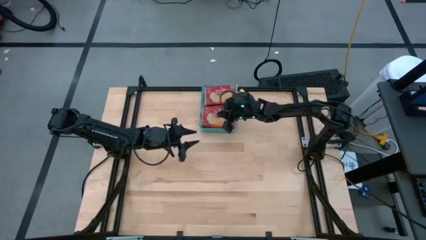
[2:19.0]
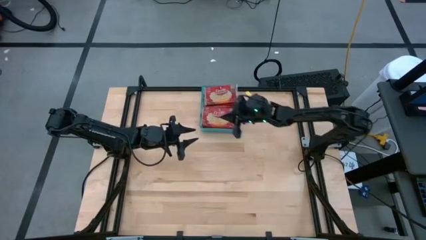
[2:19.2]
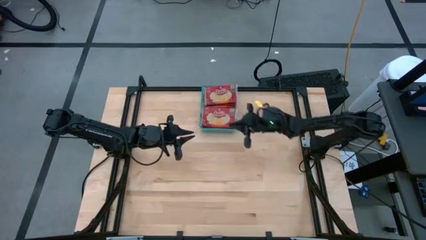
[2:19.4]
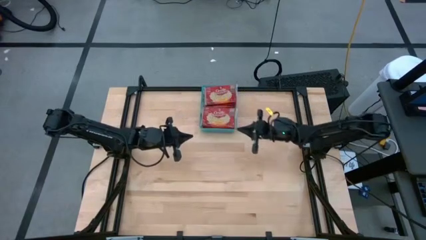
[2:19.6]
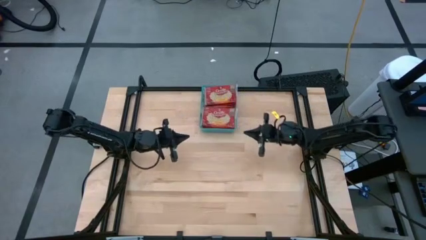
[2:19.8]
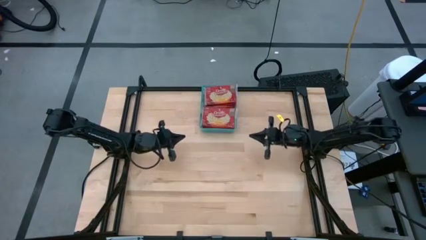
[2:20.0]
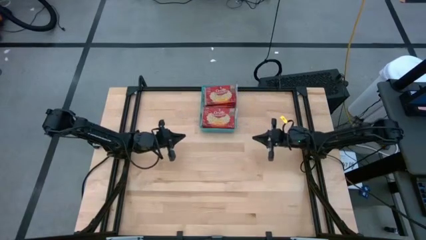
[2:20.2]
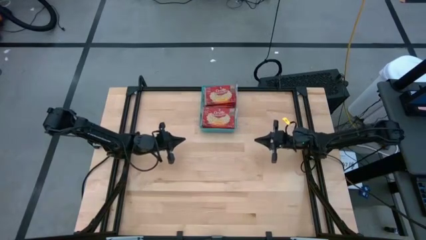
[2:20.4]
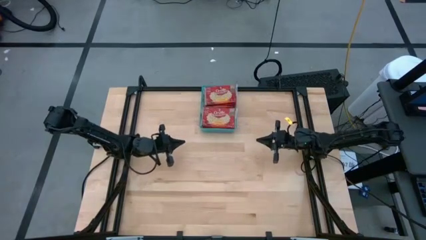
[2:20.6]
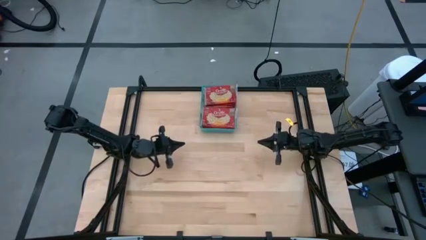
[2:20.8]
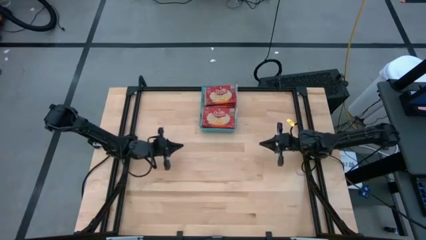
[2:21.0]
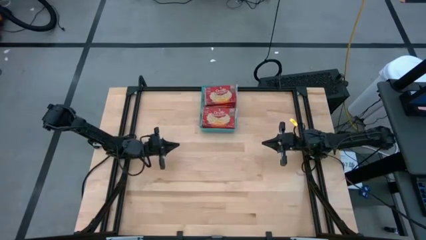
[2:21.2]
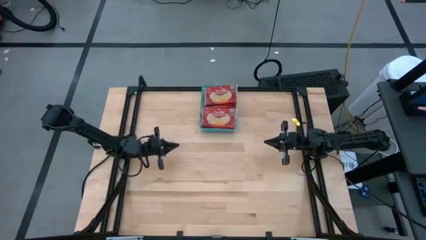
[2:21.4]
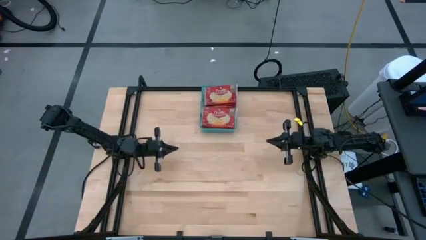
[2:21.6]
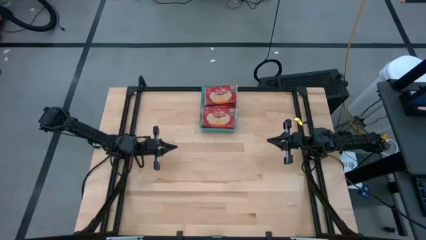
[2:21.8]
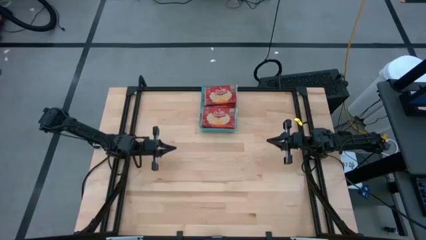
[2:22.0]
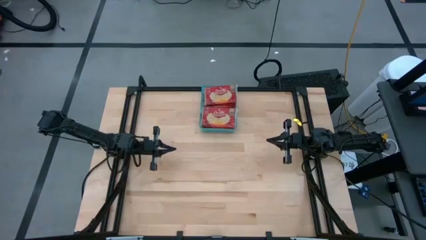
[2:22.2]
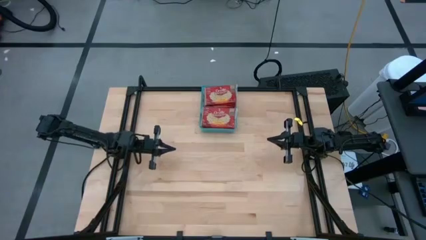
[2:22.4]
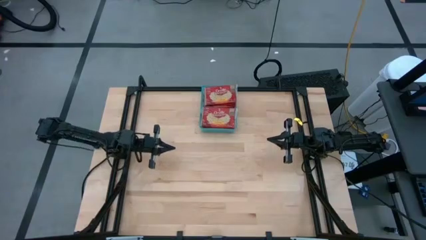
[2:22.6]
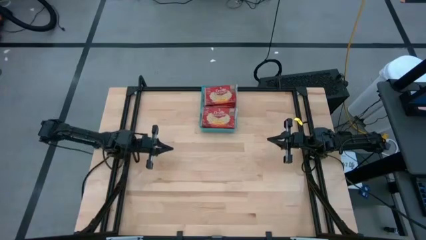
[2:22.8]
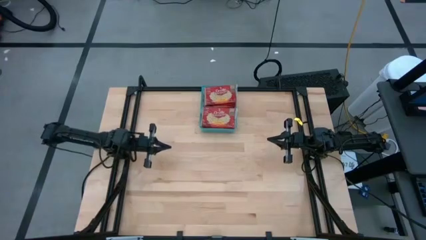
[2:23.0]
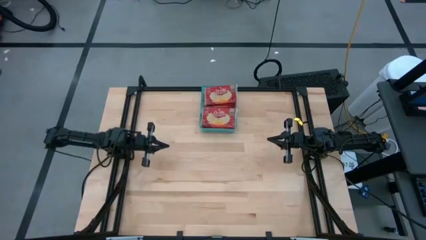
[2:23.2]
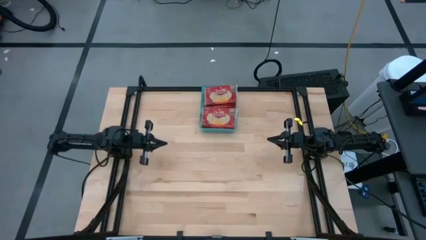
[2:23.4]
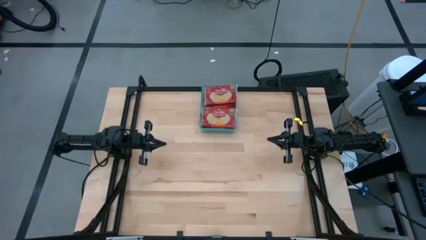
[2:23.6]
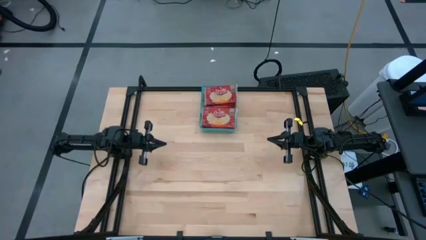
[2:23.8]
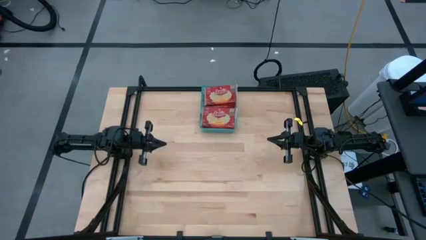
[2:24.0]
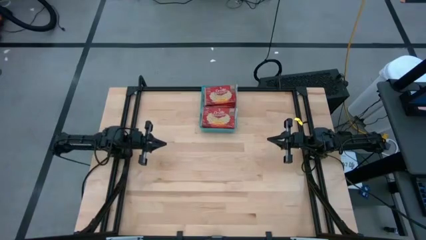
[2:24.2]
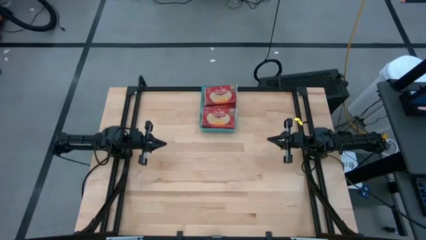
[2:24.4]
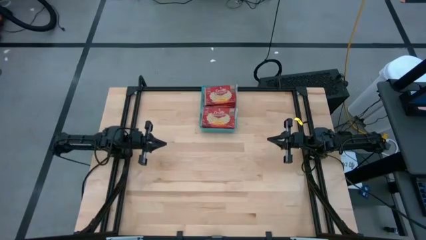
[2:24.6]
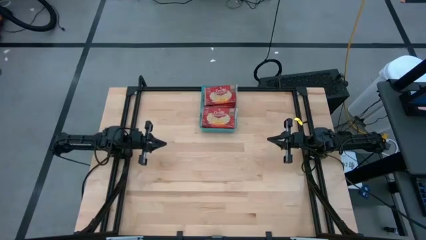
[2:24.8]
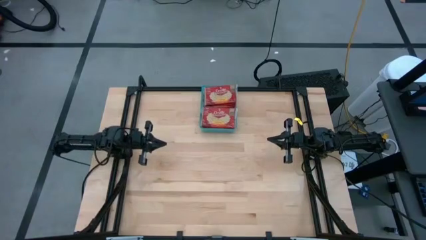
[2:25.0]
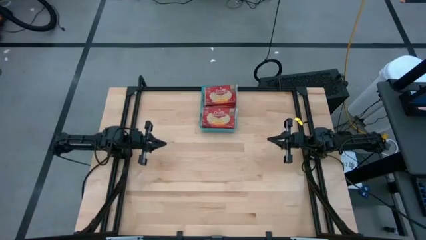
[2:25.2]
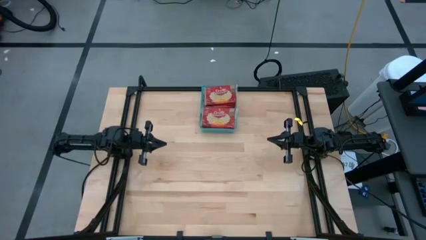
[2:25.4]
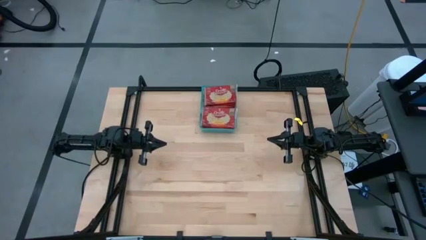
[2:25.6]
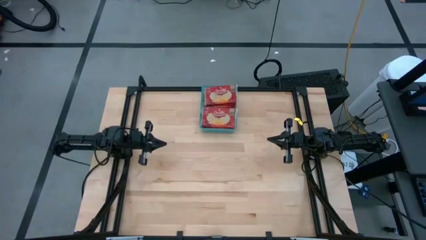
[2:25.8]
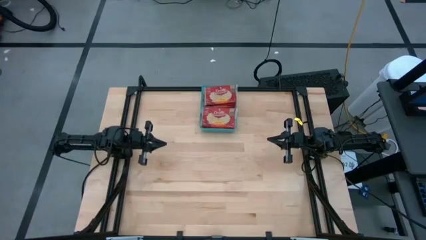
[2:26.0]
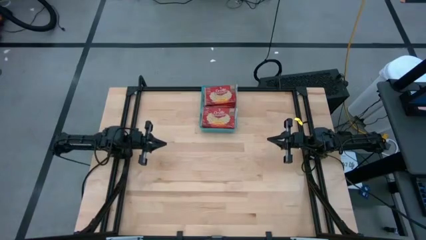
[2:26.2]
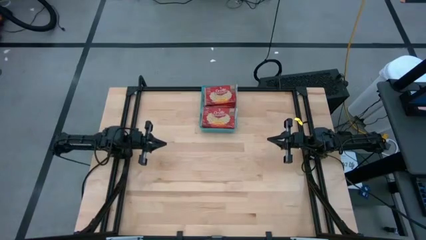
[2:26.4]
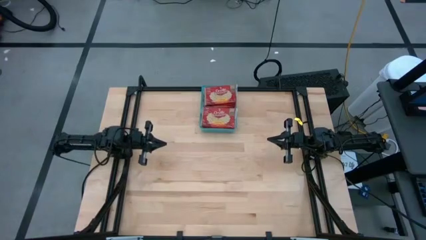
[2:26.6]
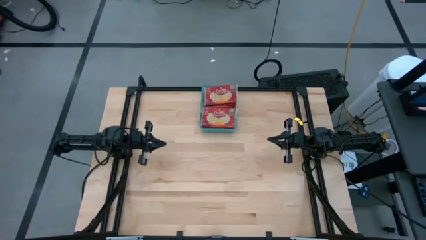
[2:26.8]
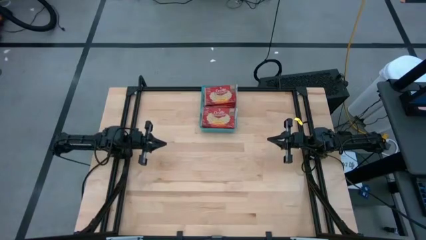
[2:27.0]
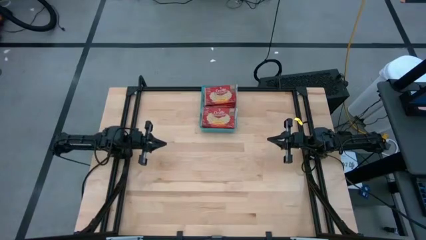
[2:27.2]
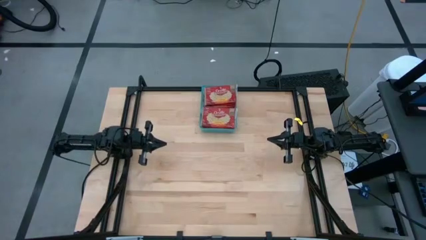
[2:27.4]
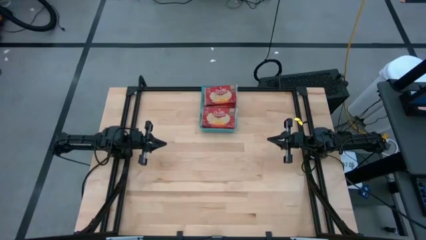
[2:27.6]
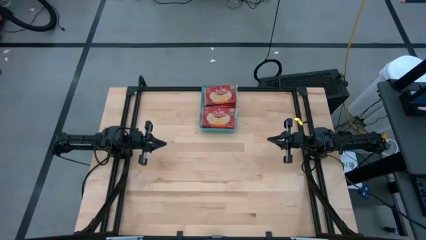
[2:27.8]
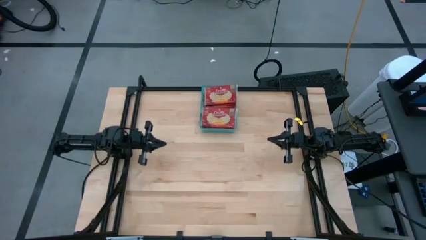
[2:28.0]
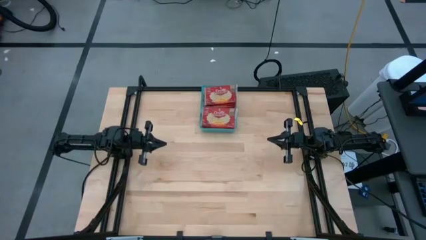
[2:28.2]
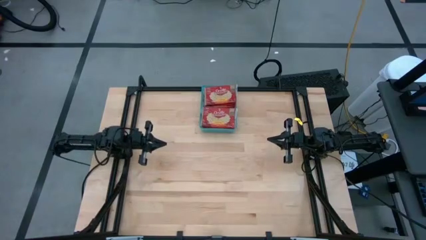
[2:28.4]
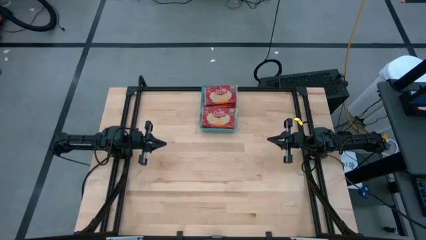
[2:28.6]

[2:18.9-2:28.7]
Task: Sort popcorn bags into baskets
Return to Home Position

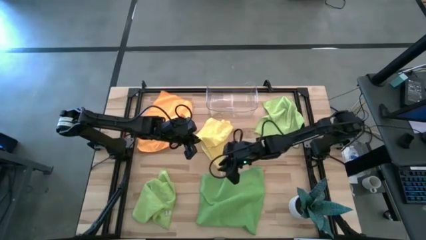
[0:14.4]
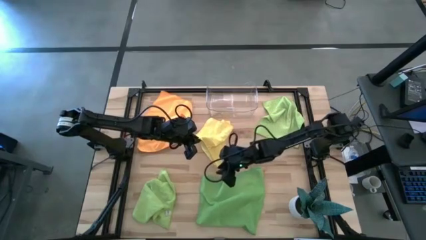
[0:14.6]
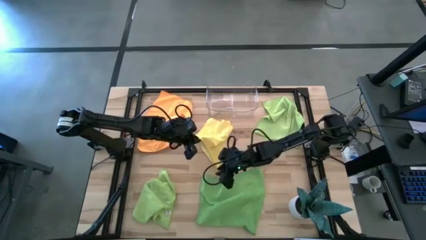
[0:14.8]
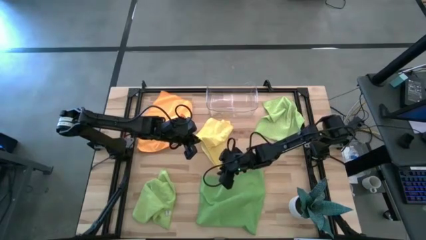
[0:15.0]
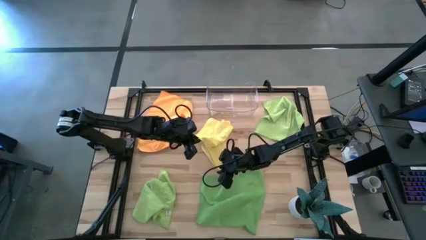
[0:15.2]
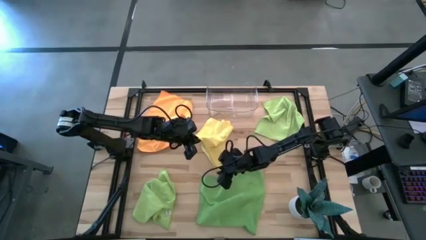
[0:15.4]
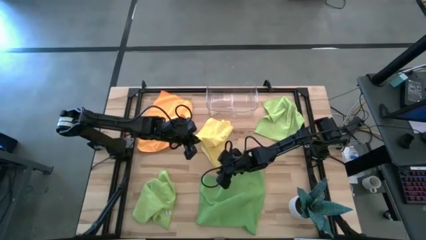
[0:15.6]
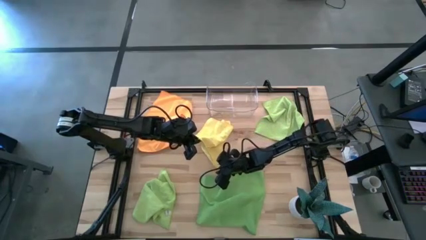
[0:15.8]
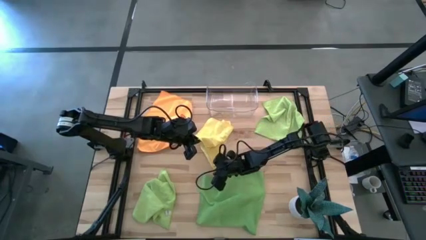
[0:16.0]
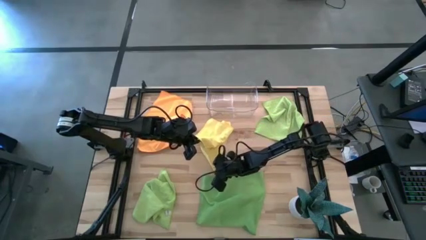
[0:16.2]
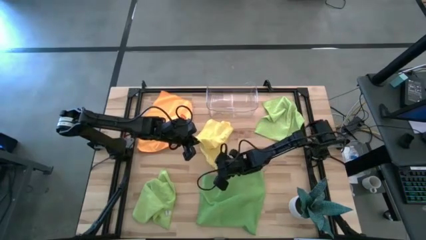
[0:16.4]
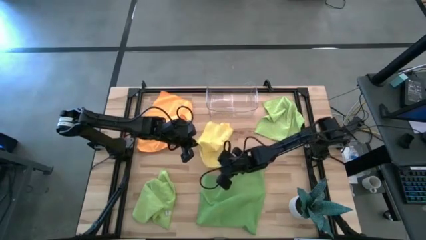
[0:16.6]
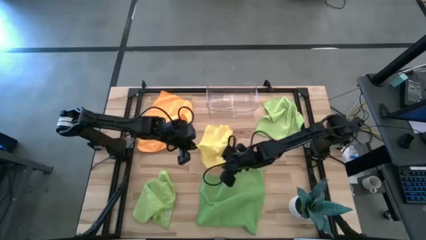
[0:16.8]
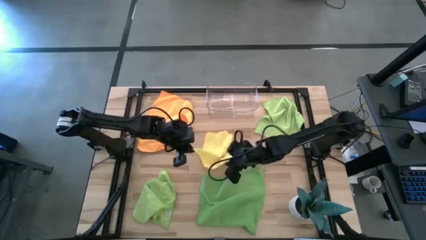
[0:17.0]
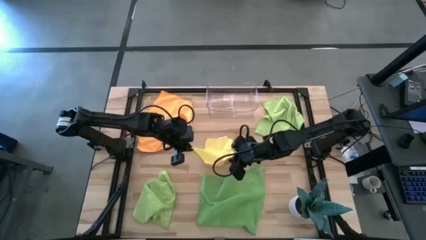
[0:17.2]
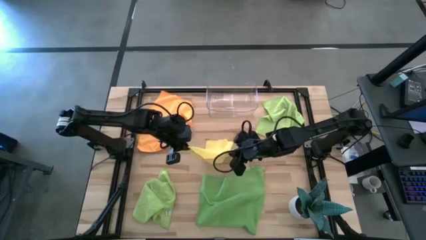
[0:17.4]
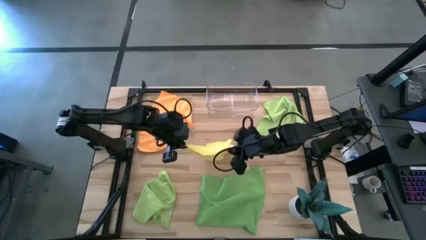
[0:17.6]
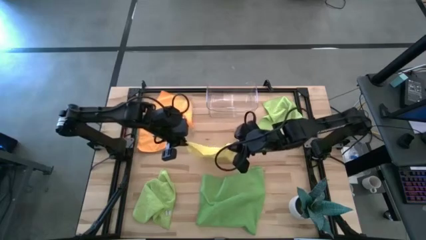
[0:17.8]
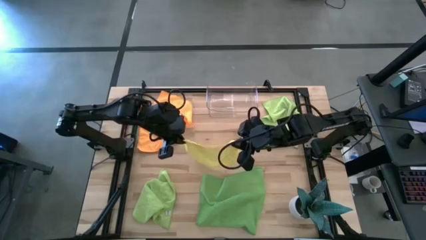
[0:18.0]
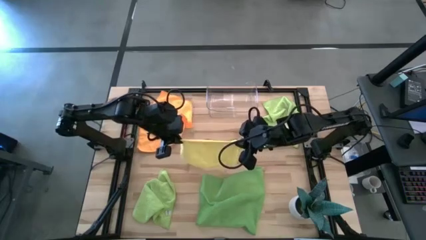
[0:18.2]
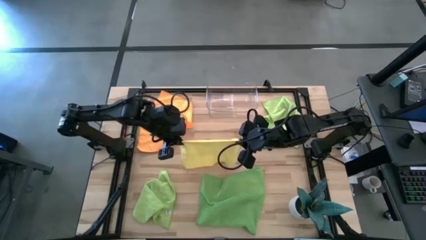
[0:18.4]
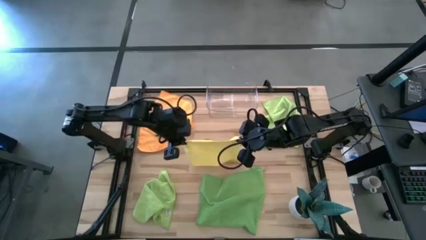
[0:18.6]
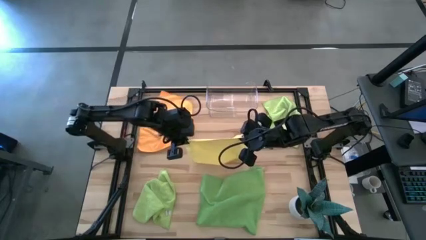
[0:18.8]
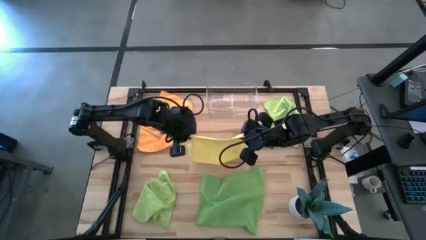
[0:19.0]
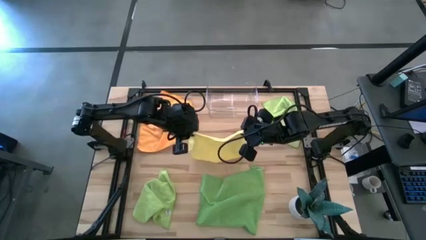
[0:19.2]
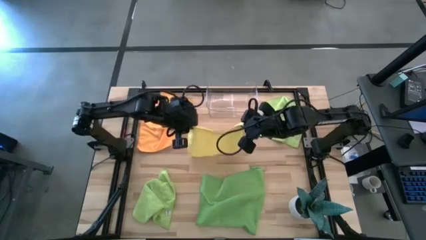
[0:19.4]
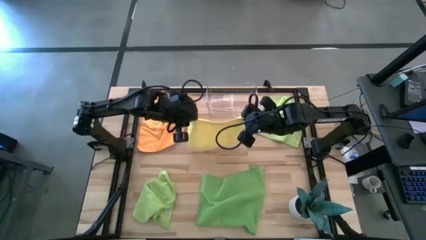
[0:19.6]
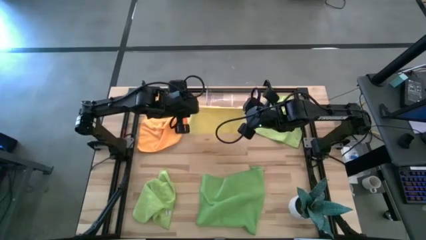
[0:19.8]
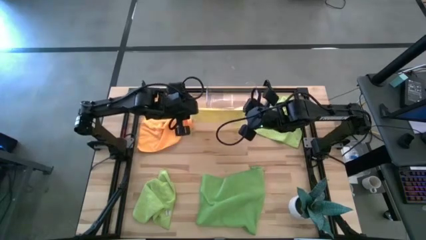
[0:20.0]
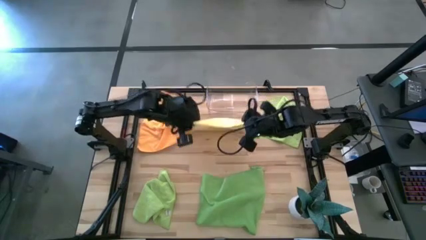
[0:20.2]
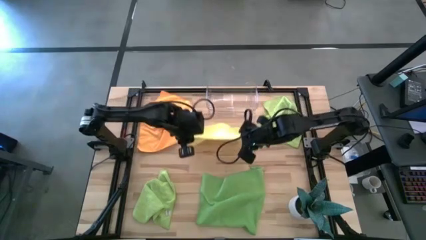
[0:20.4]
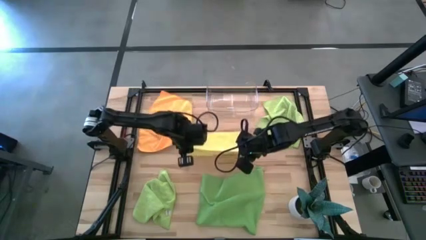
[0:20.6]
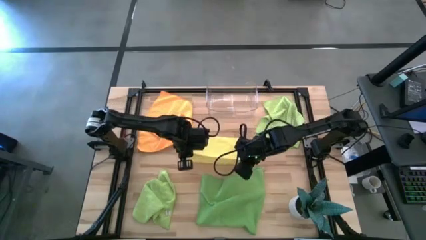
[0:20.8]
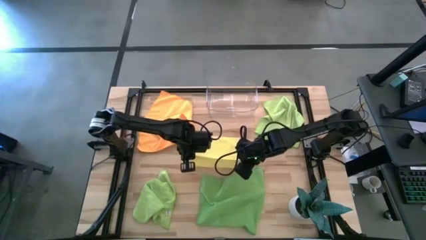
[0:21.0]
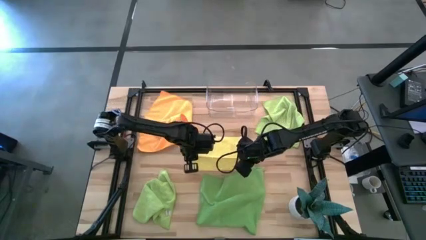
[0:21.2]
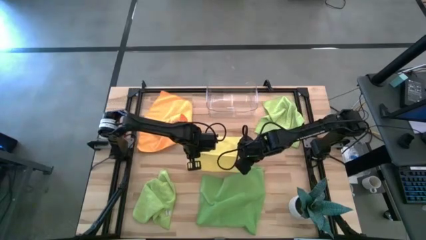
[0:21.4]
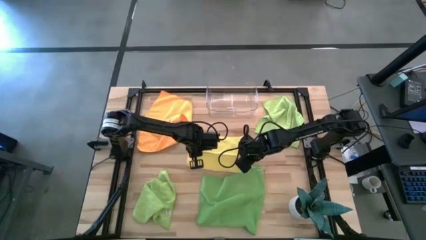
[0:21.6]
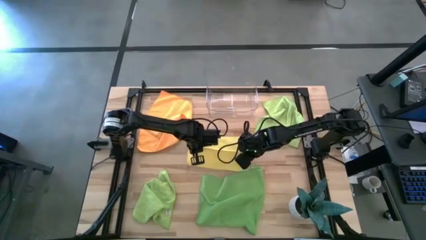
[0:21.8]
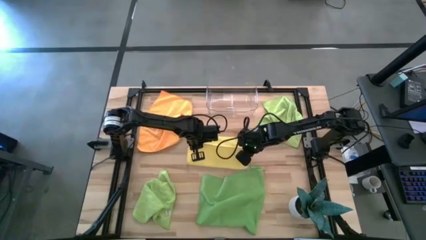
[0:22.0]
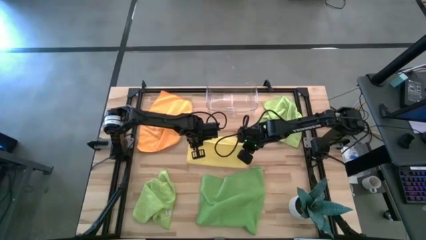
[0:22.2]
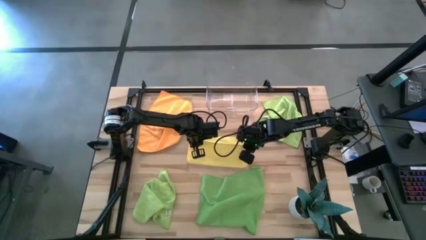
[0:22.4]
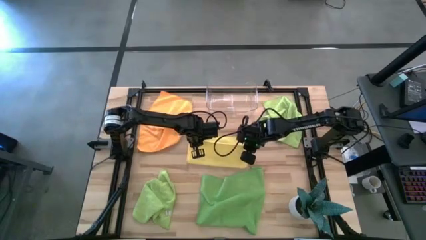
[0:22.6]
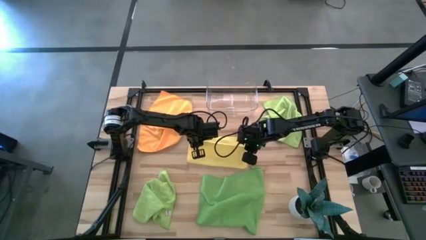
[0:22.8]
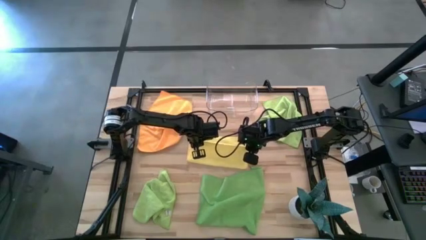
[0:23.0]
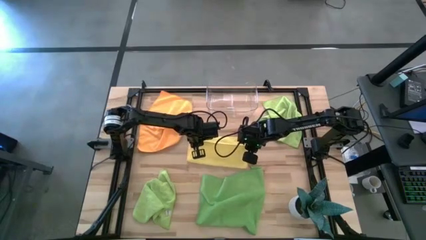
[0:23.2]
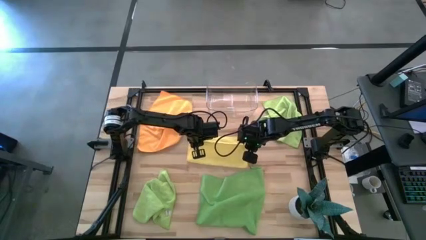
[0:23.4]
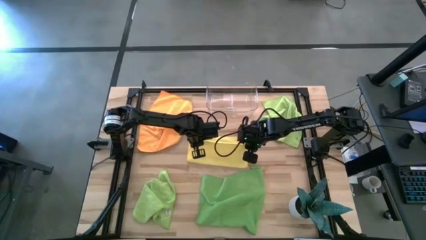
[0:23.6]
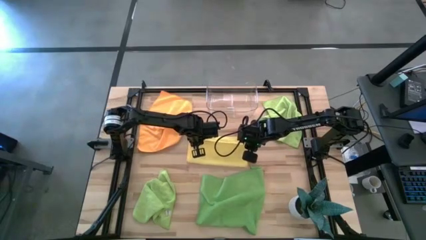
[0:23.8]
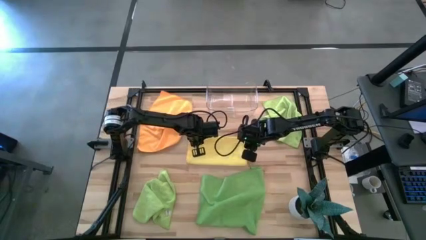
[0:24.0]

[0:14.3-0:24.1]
Task: Fold microfiber towels
Fold the yellow microfiber cloth
